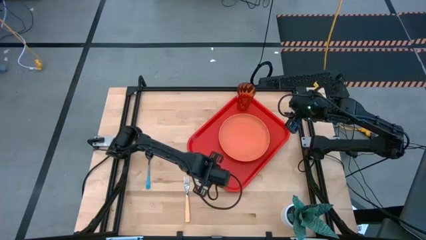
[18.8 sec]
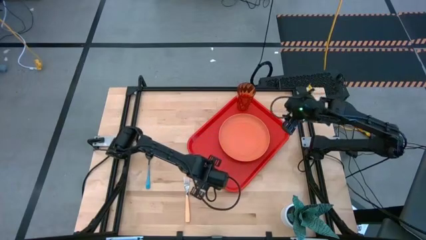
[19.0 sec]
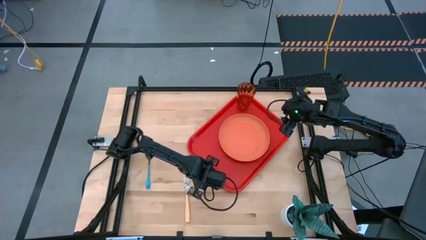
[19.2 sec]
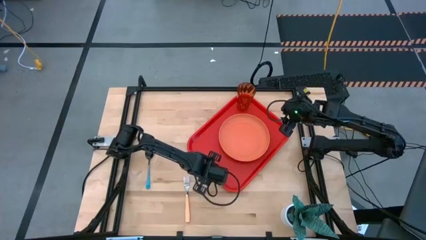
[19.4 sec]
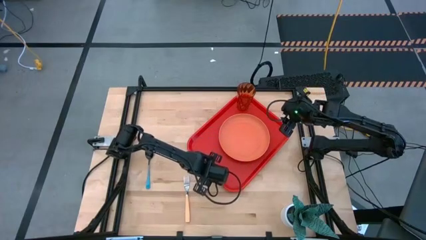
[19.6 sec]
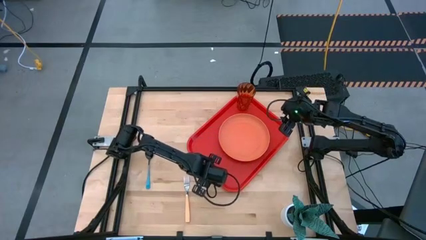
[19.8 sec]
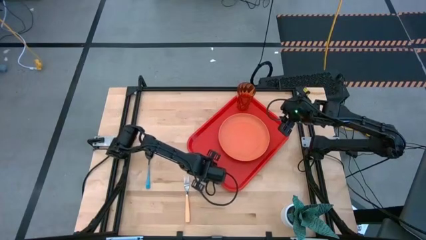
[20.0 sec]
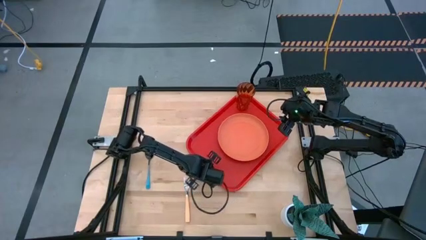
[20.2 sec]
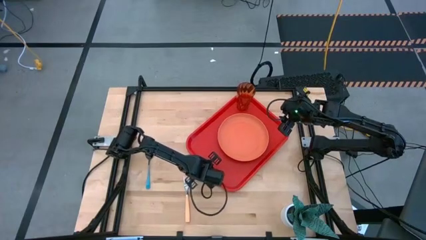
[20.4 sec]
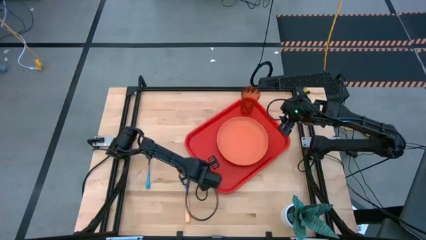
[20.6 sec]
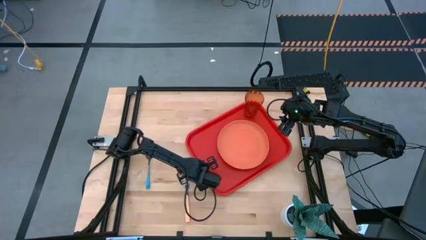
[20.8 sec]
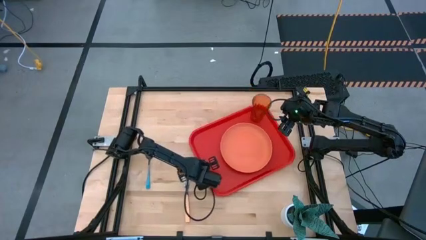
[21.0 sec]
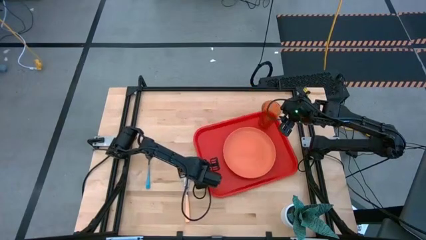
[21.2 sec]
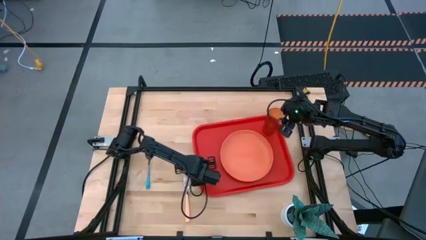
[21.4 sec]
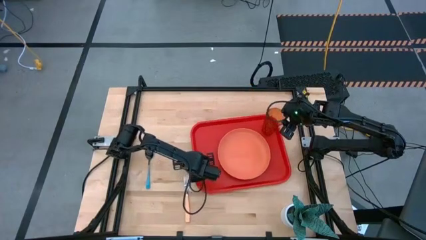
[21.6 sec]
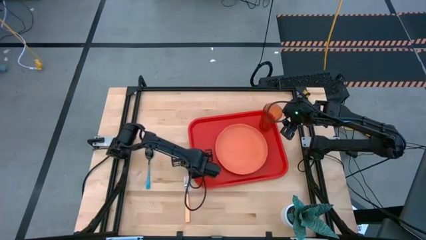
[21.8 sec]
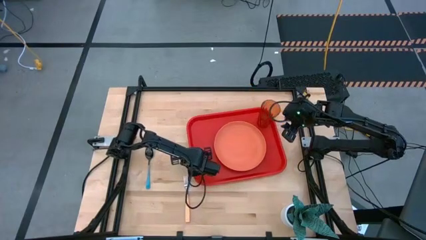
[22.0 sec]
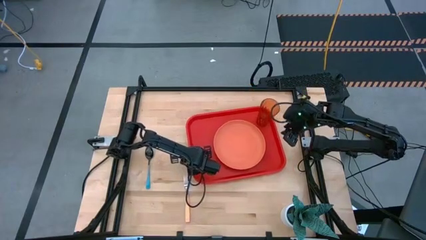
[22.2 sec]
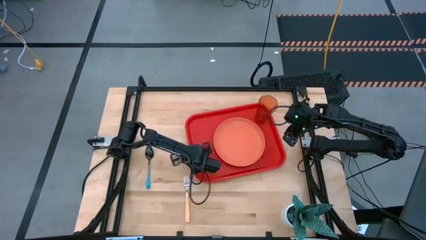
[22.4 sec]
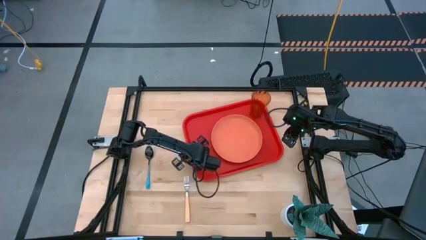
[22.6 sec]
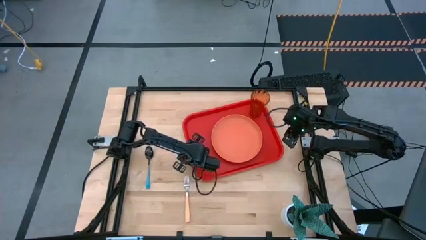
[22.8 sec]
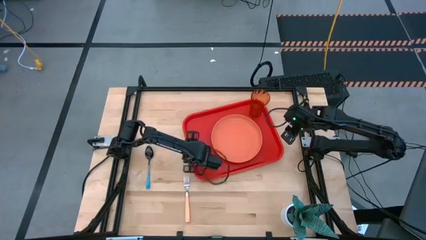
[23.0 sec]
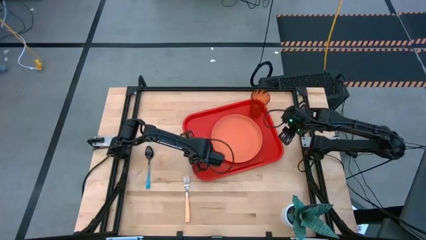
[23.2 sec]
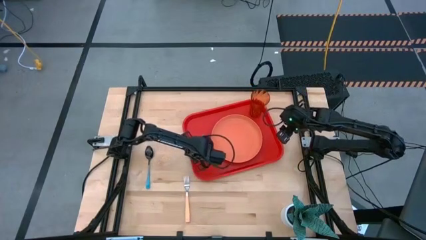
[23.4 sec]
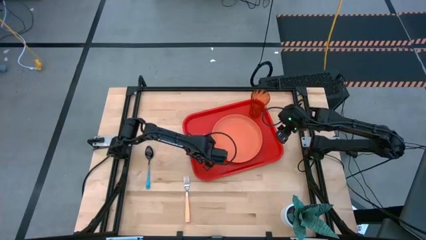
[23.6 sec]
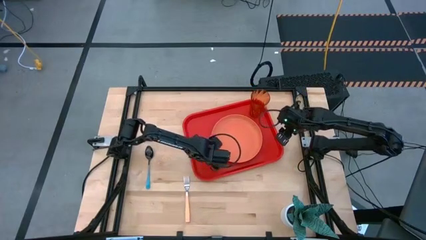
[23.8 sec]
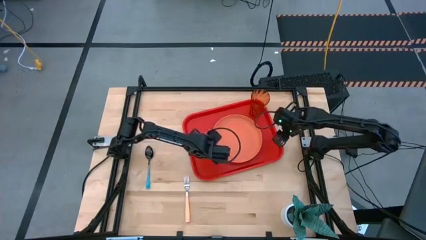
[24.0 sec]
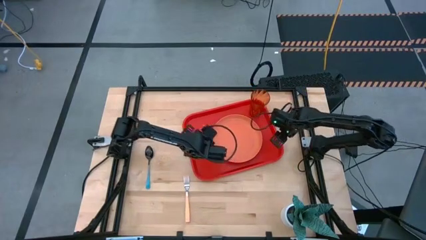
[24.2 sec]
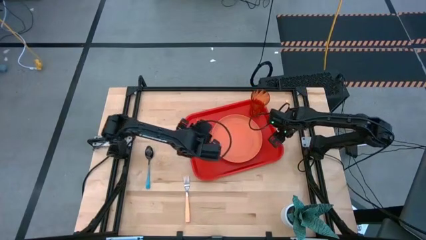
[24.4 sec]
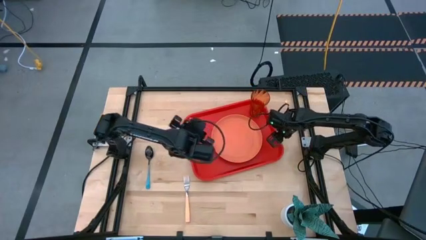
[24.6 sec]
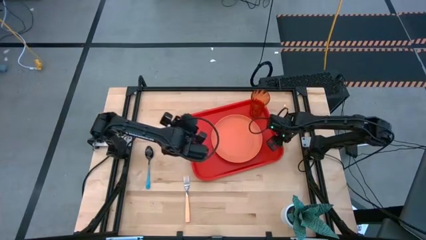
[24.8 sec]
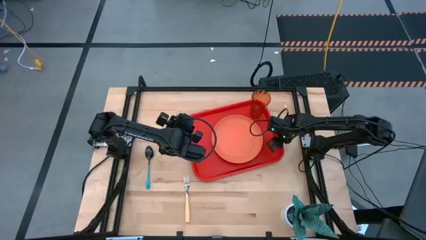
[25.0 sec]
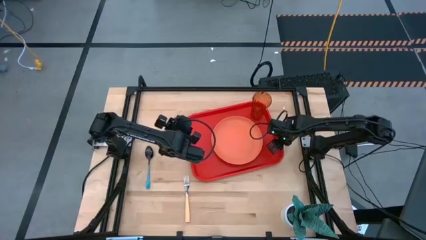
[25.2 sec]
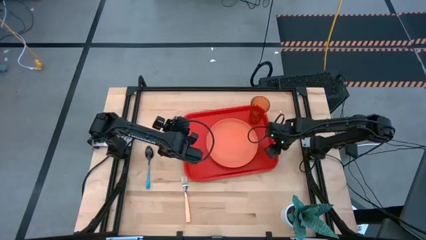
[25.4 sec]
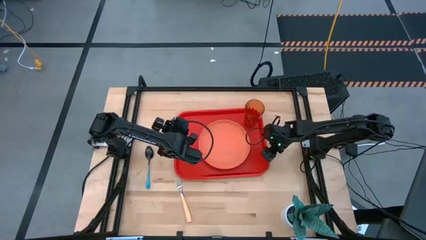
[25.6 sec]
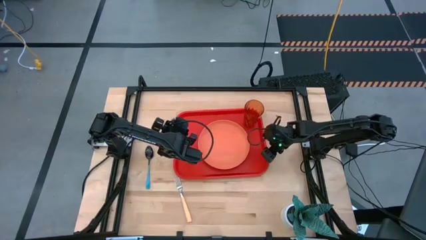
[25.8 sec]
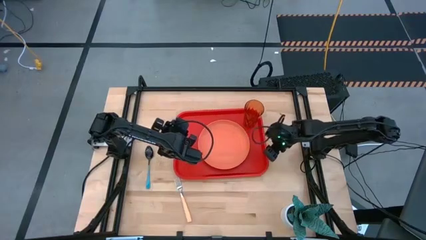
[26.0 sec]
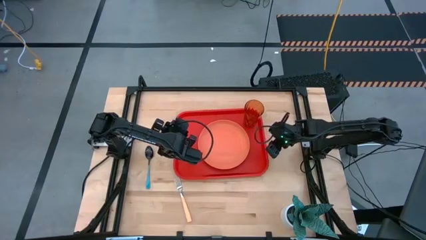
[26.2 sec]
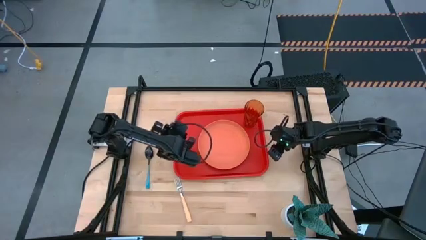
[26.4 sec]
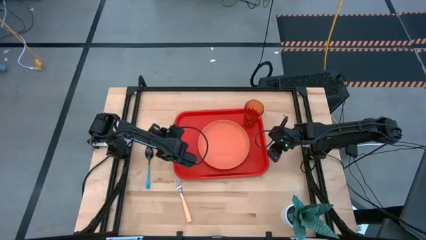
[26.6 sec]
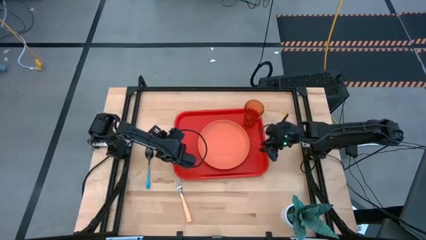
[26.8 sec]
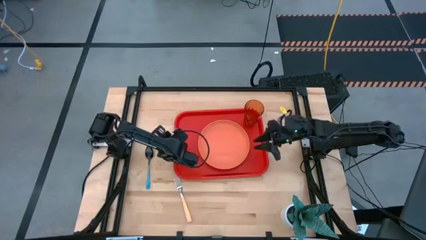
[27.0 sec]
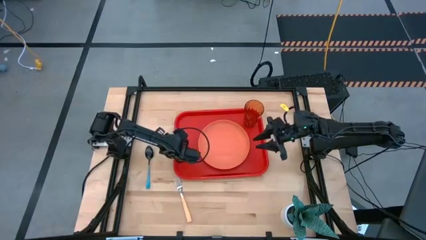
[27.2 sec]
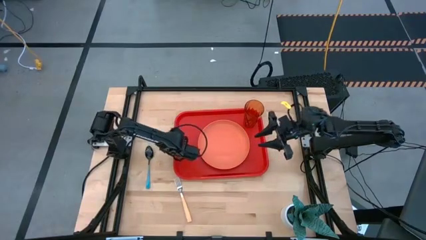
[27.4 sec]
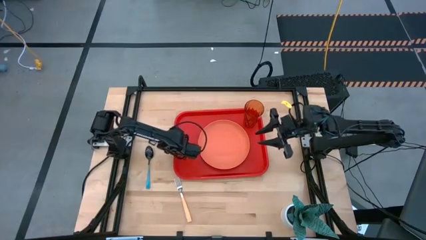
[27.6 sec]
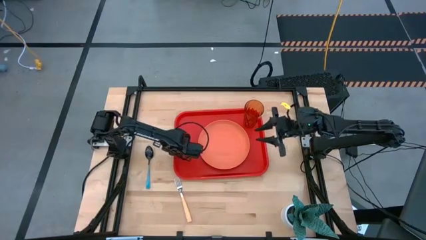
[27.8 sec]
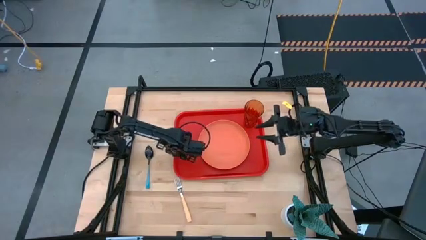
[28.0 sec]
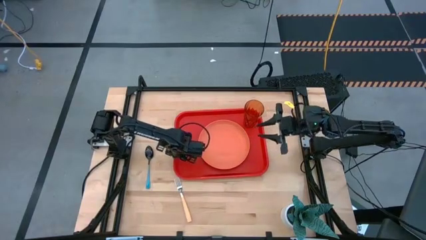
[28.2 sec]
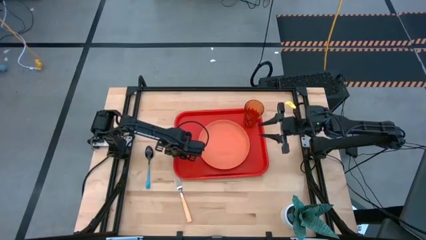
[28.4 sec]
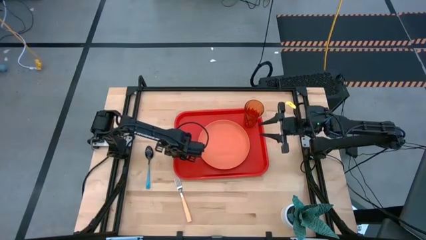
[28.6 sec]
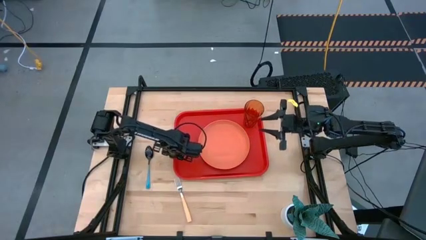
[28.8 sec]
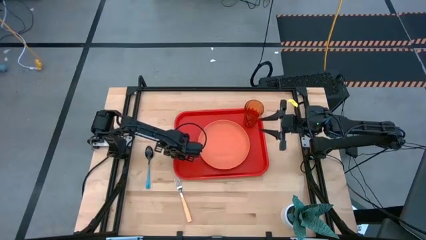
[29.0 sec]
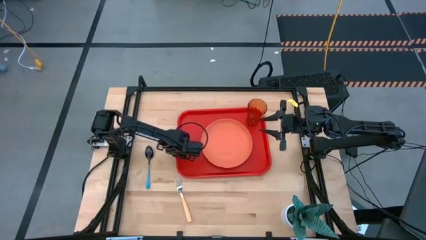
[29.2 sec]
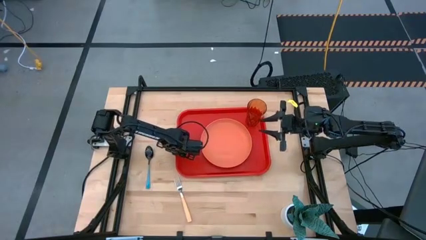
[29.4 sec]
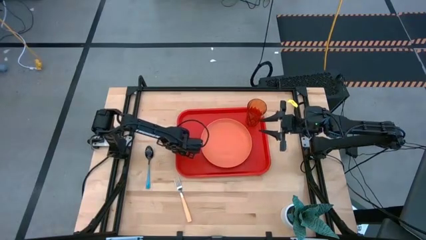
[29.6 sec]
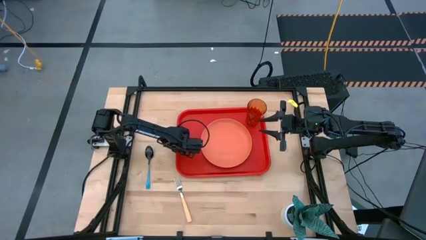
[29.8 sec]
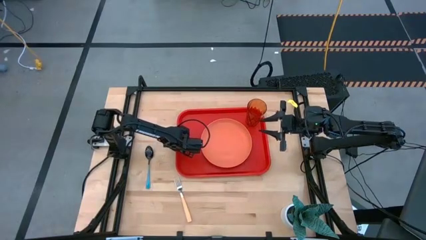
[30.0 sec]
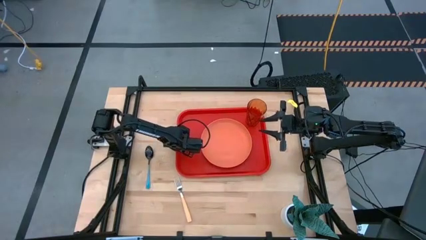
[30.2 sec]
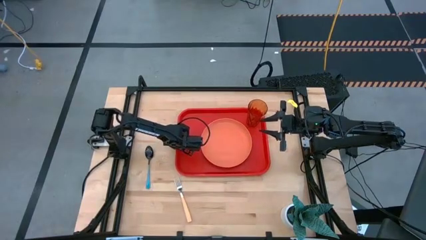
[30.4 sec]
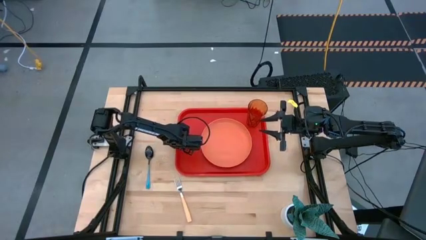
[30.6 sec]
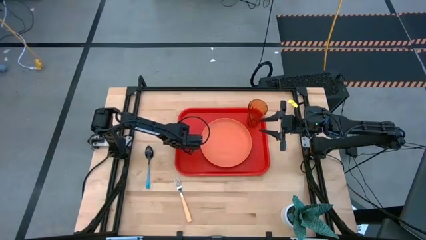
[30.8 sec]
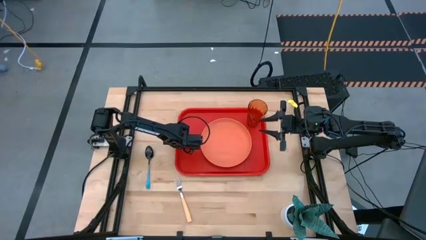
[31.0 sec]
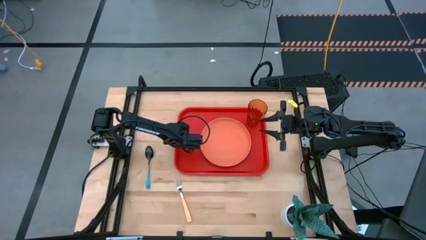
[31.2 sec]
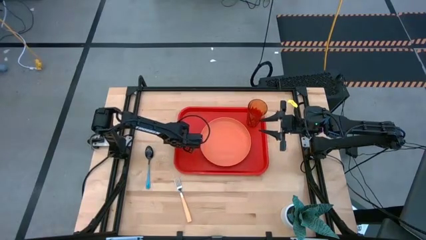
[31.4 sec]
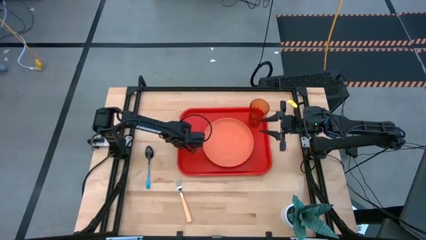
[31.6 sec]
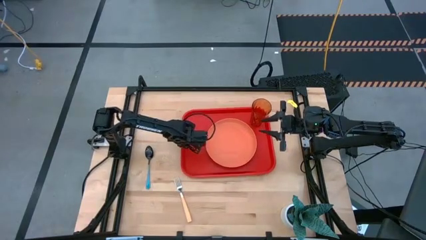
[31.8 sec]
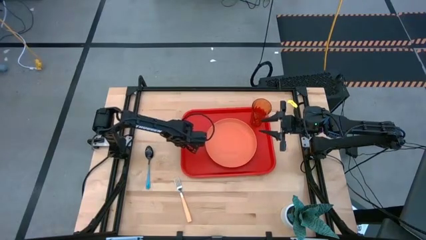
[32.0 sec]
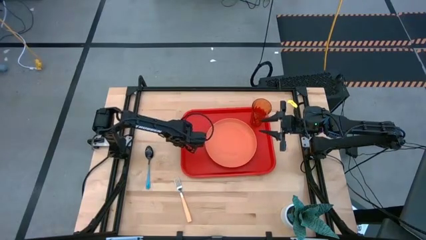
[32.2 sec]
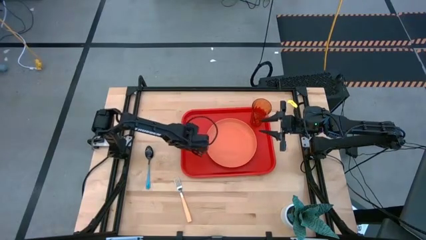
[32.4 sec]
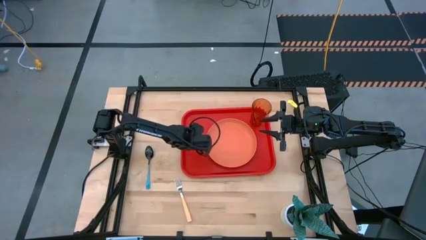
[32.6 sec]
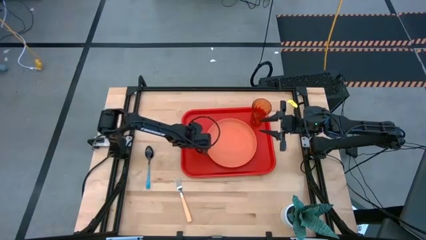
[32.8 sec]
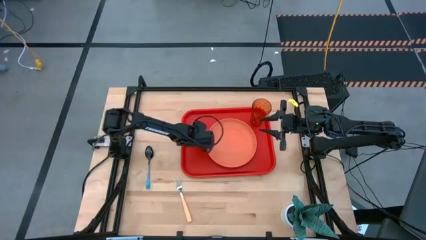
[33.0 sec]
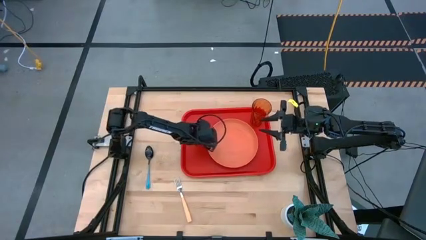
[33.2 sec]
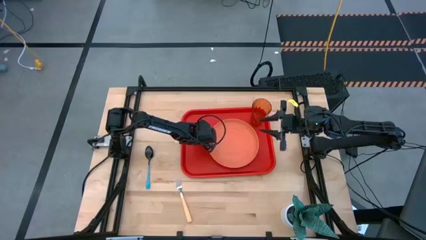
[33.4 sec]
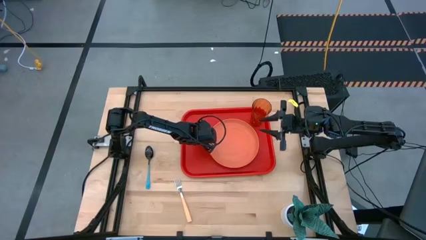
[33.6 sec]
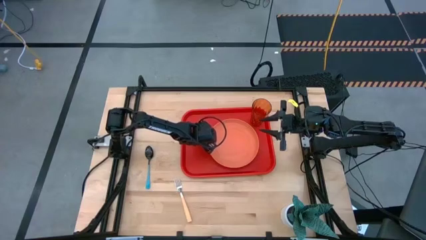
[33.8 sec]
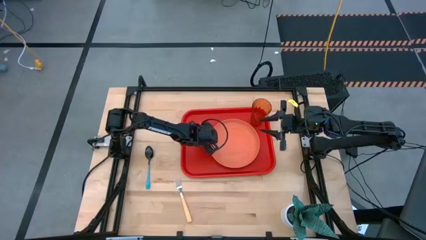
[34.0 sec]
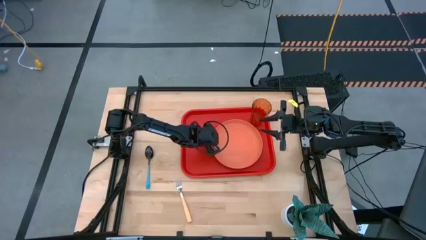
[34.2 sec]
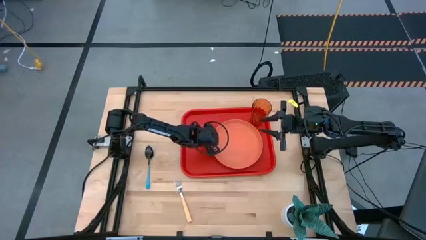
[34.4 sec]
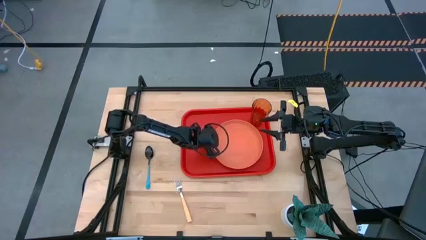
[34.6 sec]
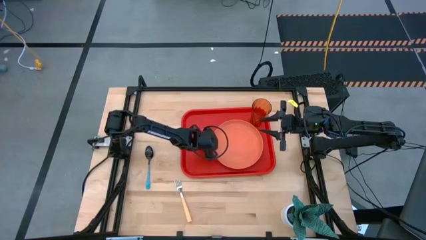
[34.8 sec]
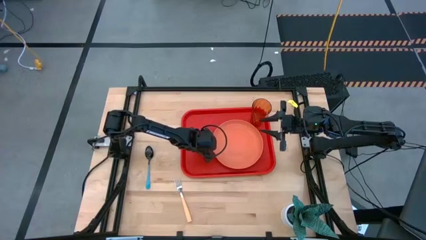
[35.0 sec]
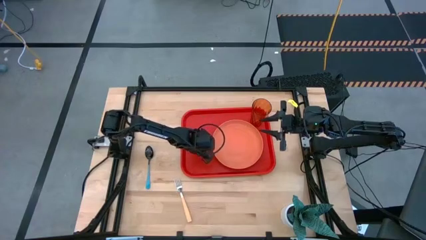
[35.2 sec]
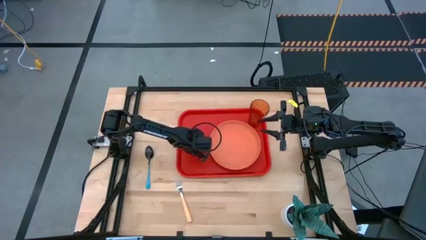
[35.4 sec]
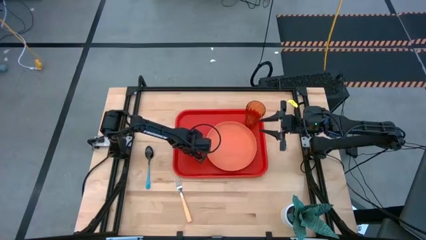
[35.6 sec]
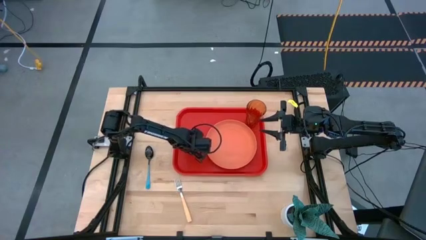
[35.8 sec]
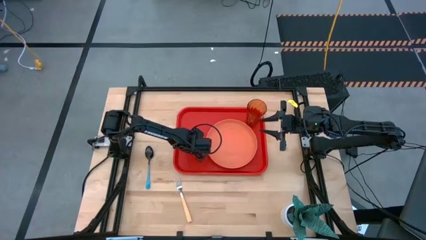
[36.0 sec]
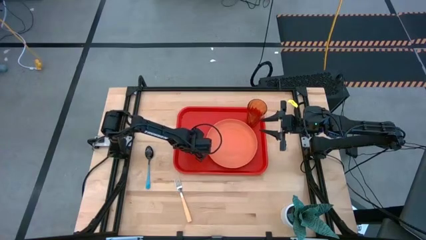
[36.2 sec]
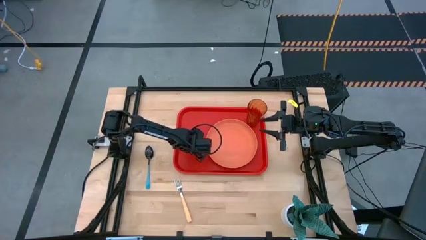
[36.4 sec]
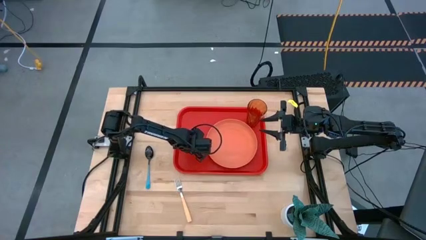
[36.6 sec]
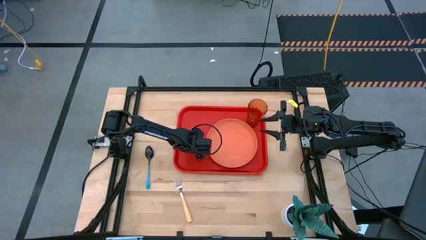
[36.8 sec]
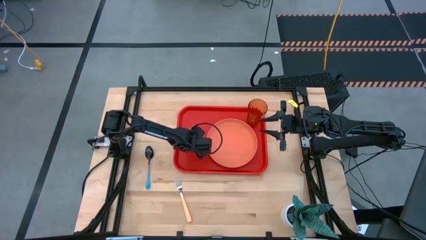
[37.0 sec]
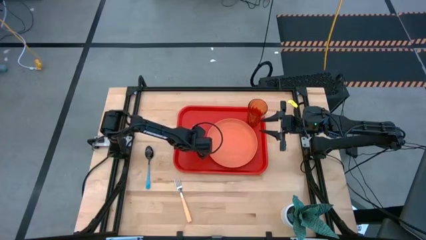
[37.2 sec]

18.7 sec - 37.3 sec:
Task: Pick and place plate/cup/fork/spoon on tray
Move the red tray to the center of the table
